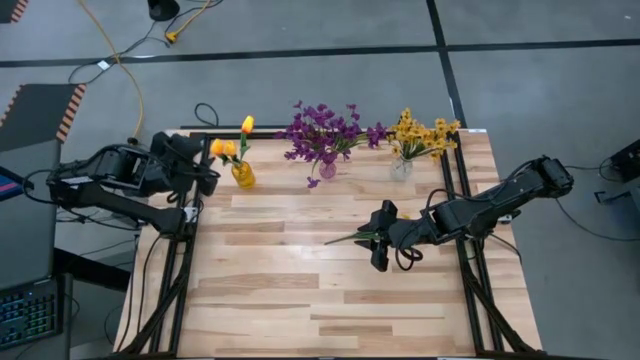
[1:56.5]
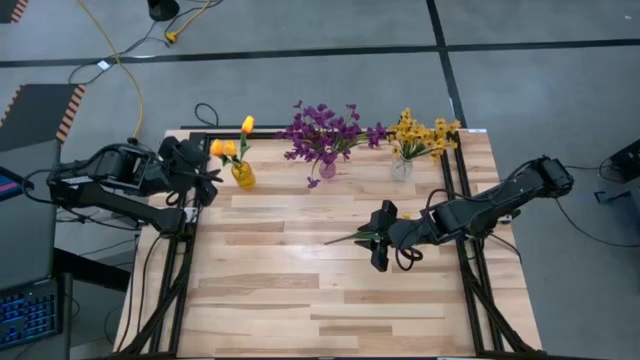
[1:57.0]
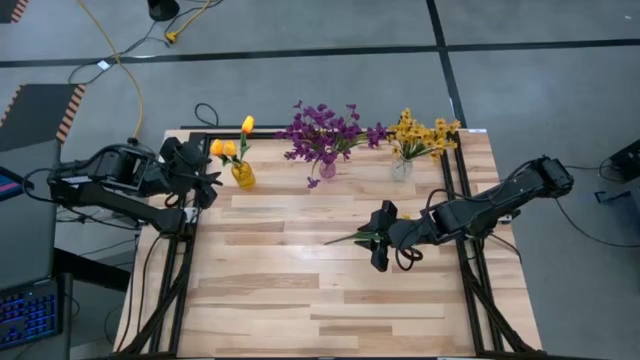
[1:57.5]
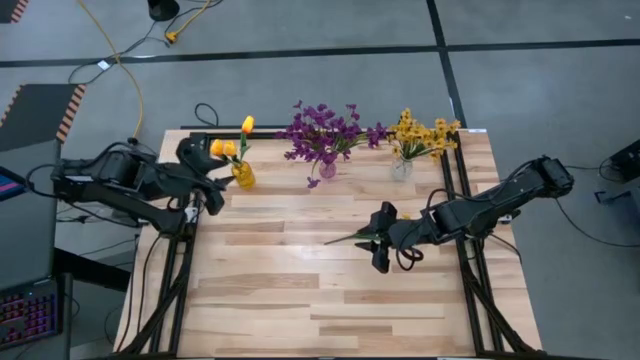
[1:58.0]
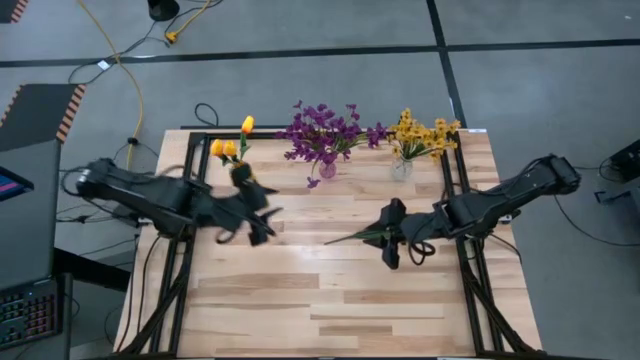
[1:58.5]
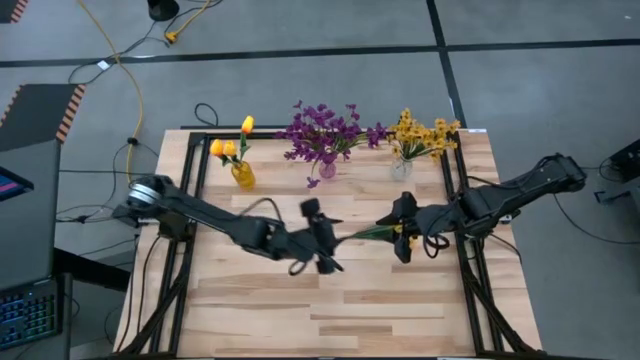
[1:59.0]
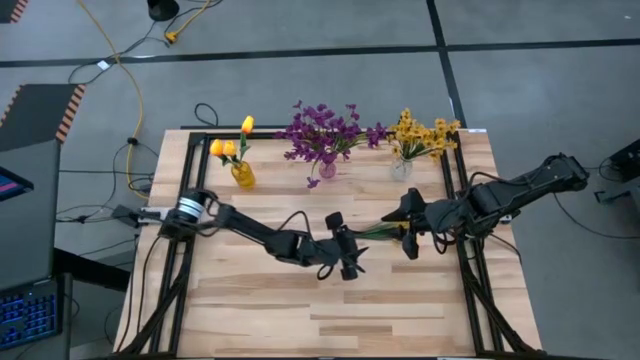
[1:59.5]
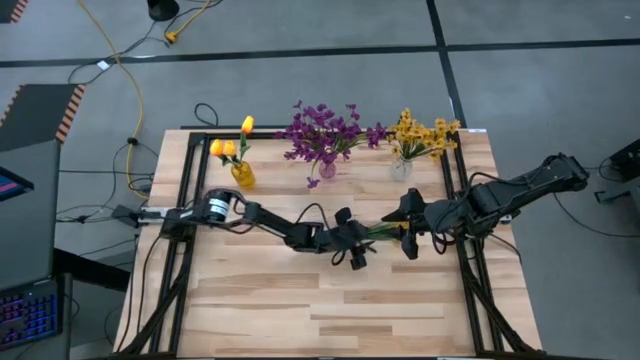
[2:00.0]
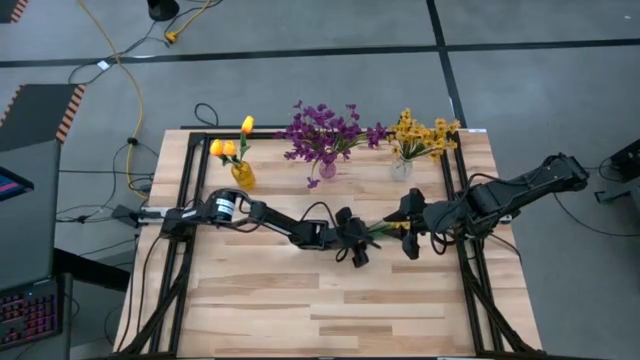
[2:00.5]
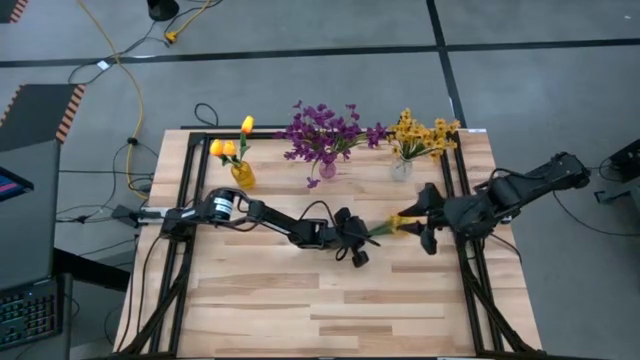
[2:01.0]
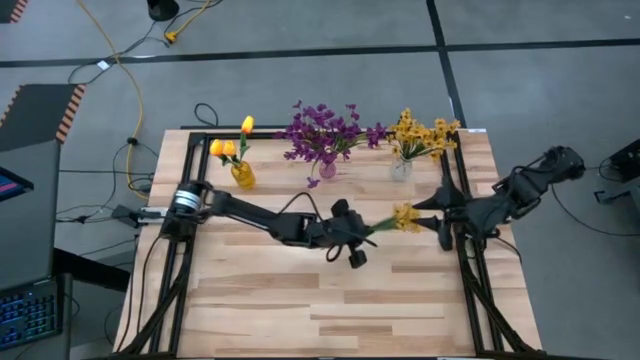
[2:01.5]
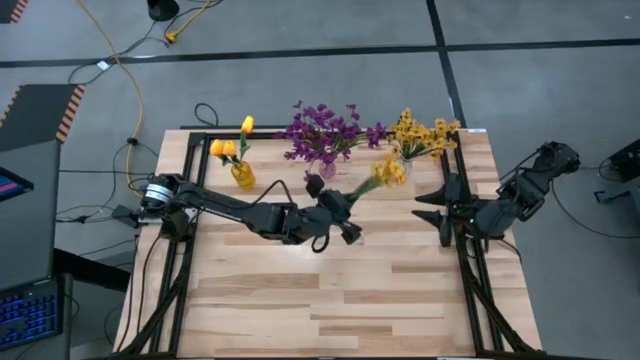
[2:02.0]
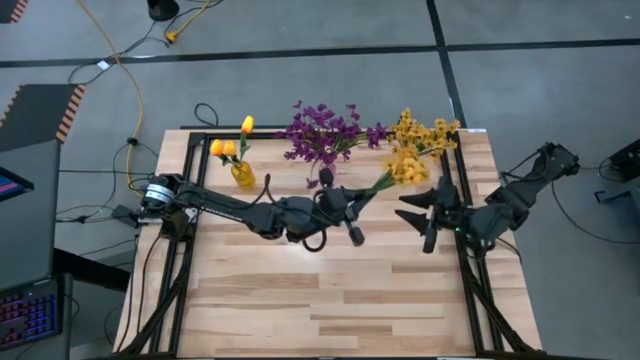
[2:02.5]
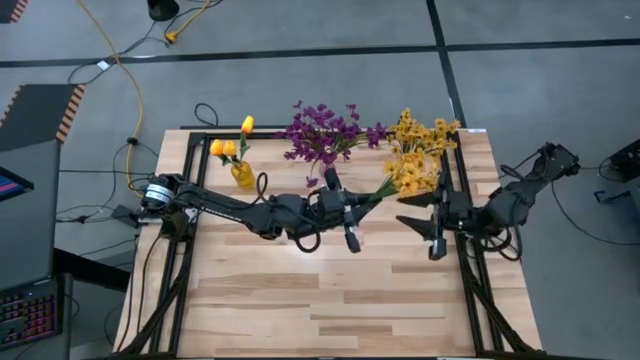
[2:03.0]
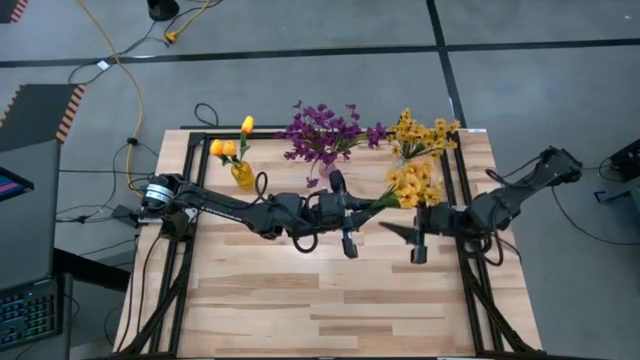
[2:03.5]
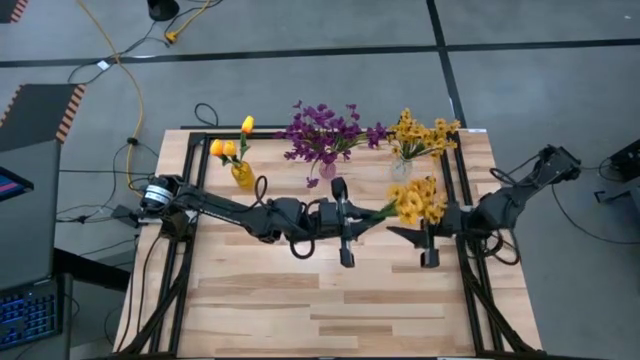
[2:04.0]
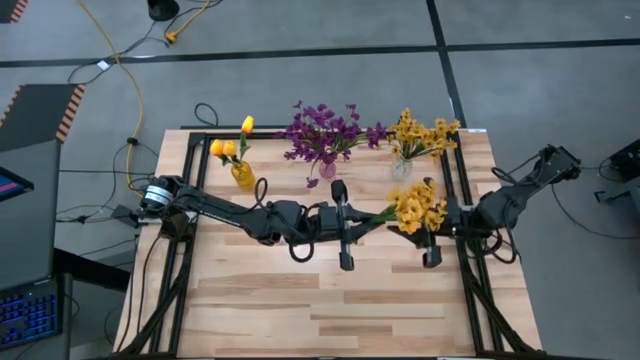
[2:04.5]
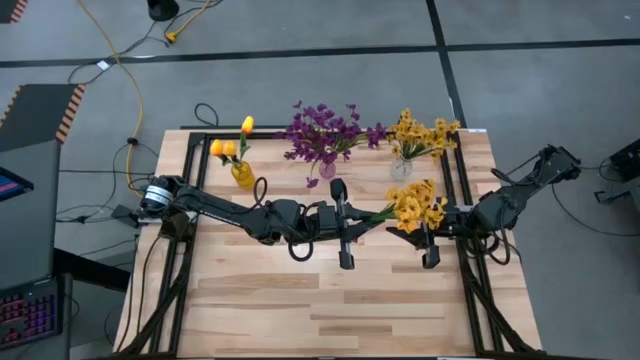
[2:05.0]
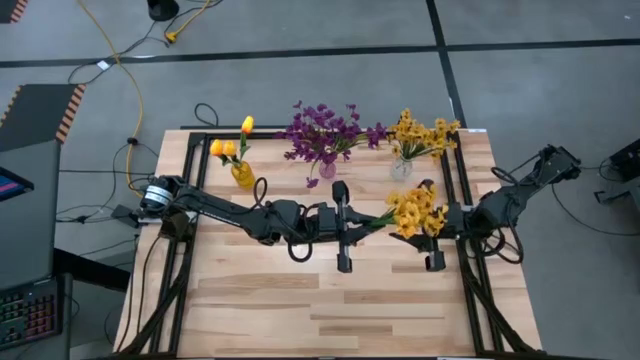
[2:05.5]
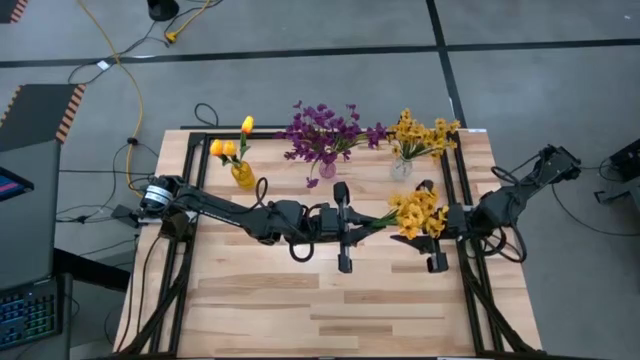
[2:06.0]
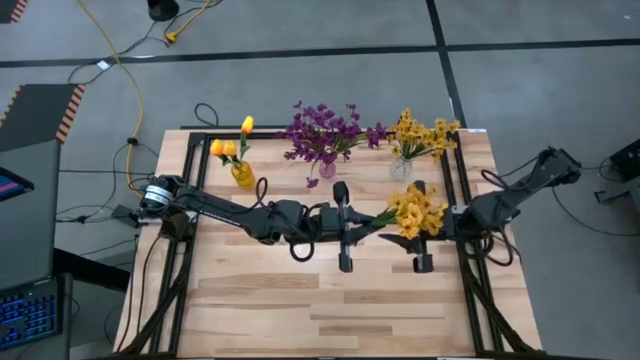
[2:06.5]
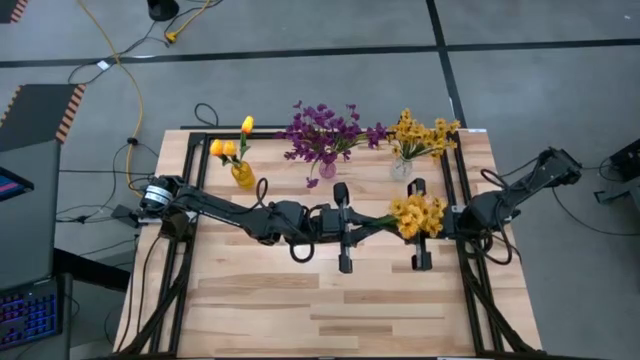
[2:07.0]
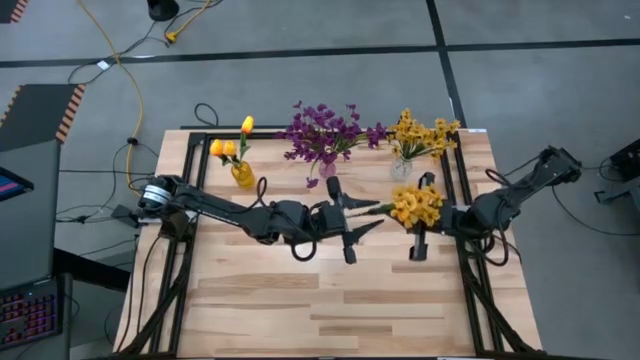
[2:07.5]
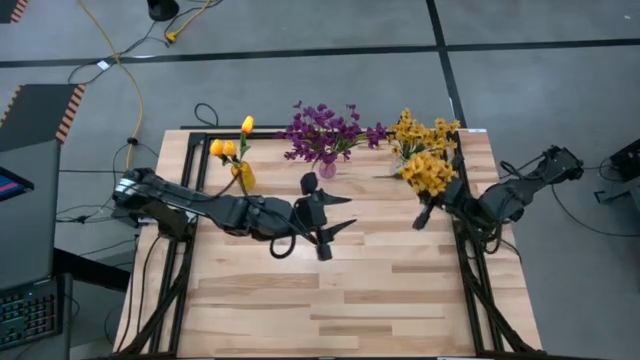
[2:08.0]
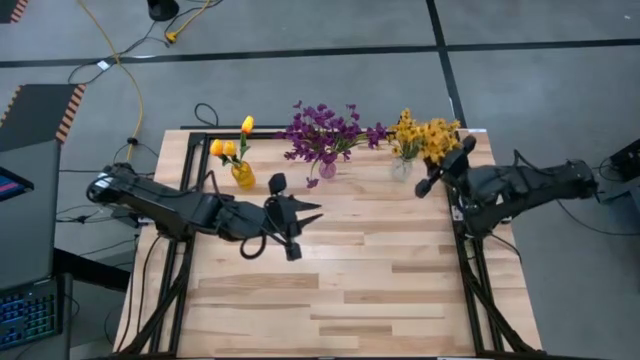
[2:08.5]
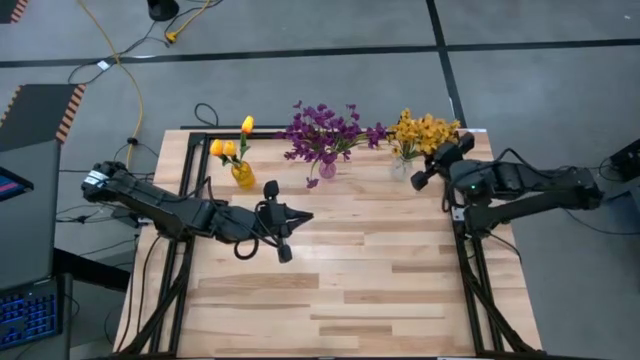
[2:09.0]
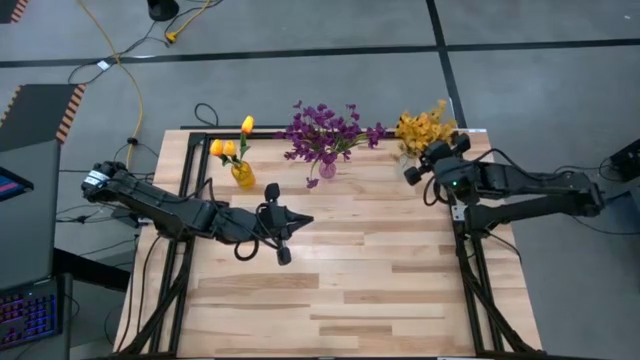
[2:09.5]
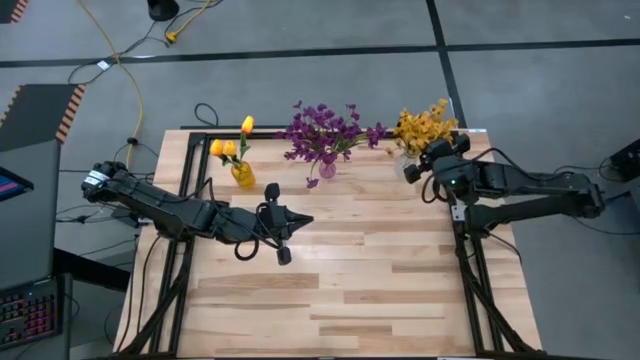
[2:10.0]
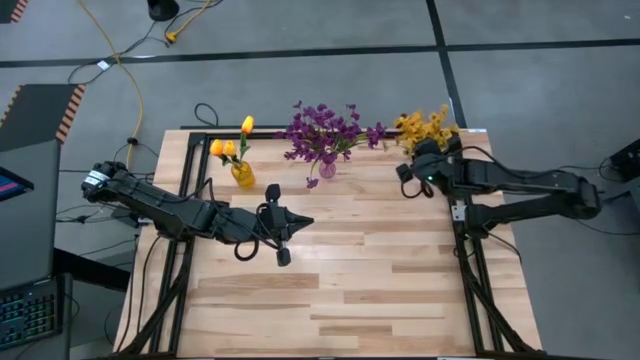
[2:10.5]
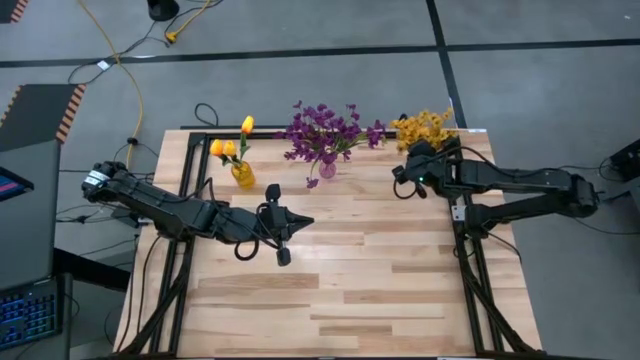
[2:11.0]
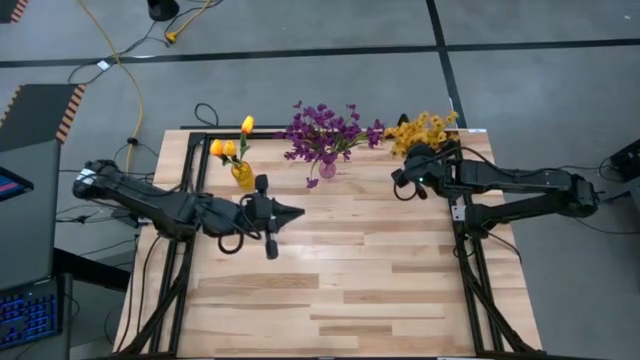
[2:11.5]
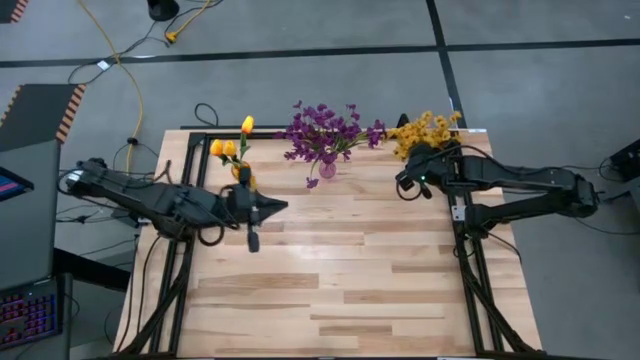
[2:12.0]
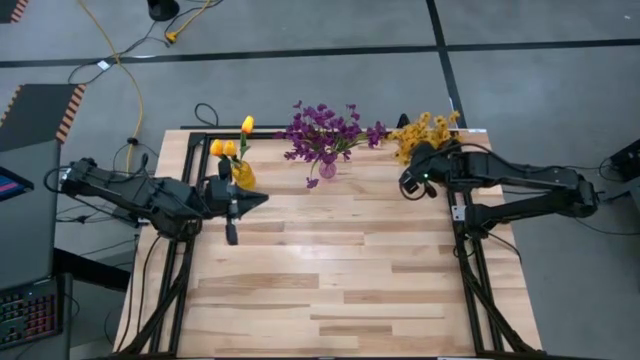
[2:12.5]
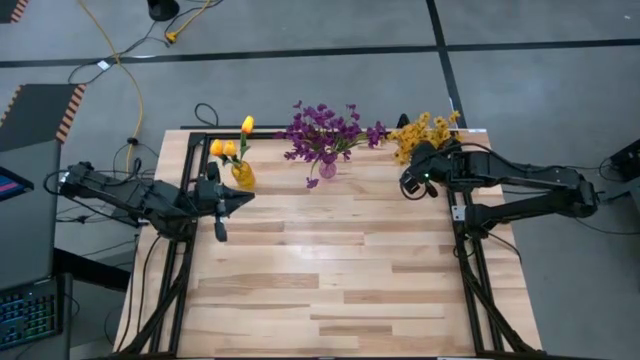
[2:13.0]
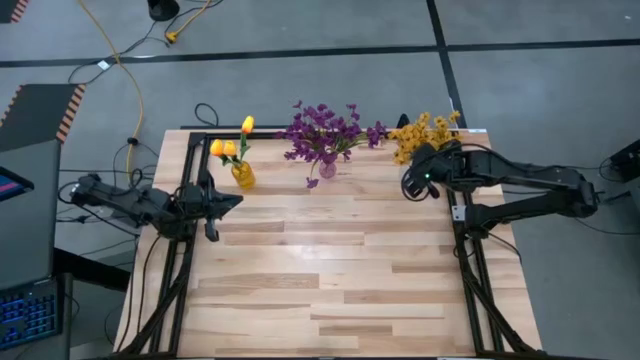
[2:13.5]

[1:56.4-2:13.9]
Task: Sort flowers into vase by color
Put the yellow flowers into the transparent vase

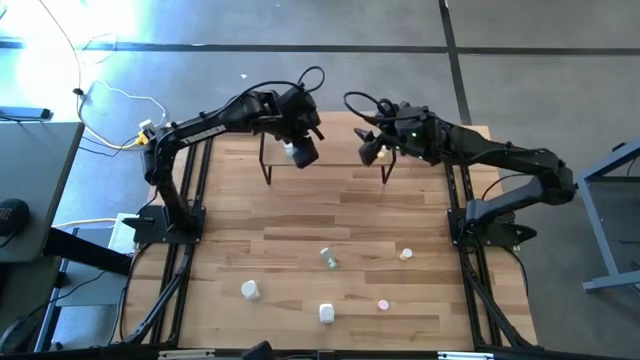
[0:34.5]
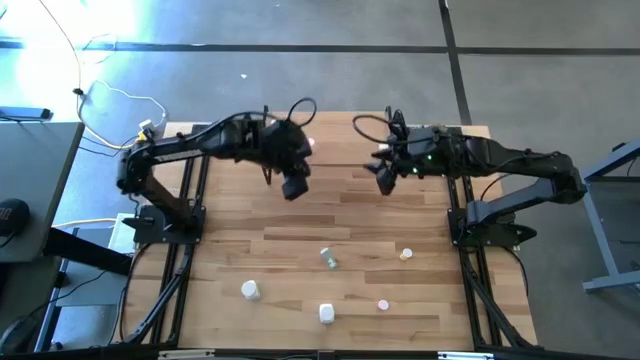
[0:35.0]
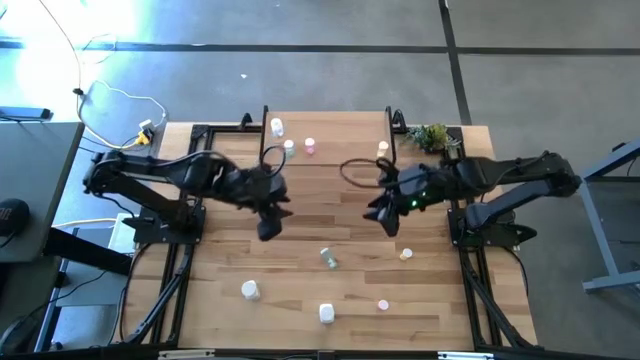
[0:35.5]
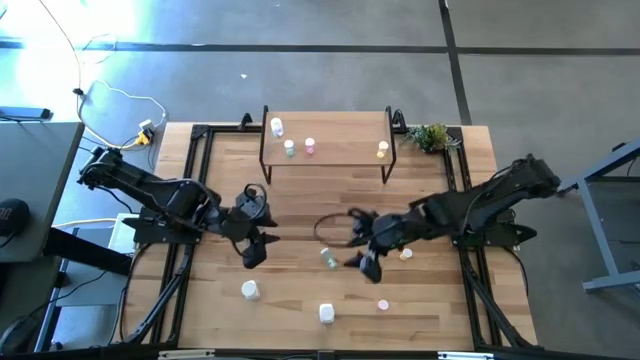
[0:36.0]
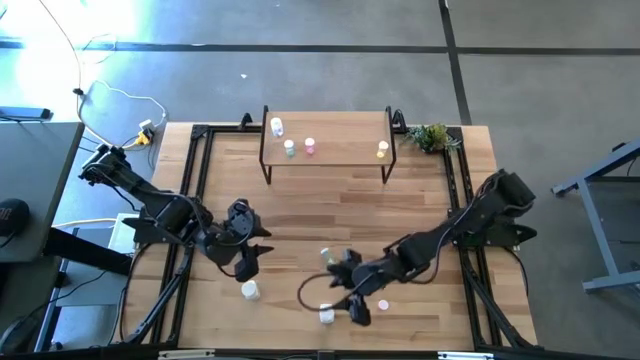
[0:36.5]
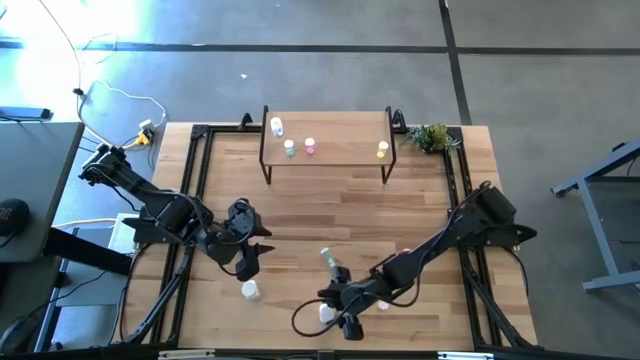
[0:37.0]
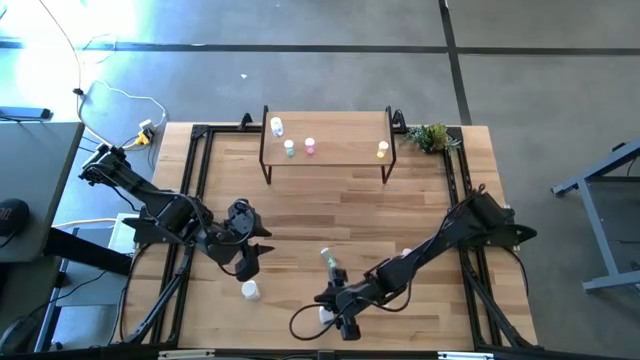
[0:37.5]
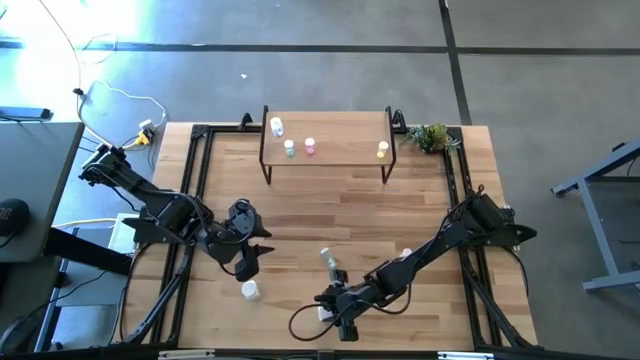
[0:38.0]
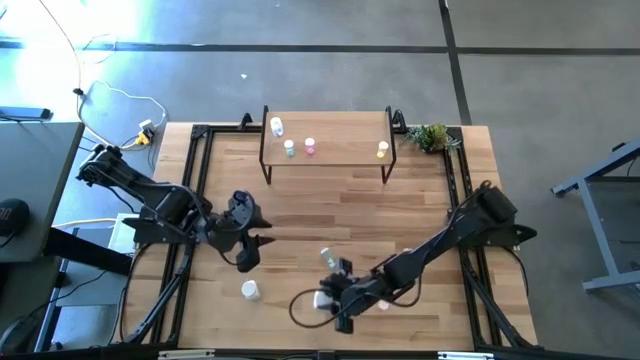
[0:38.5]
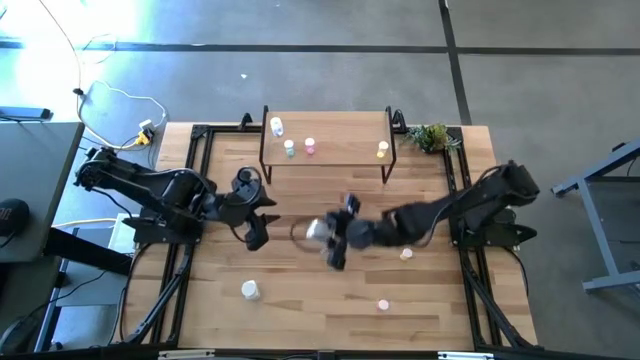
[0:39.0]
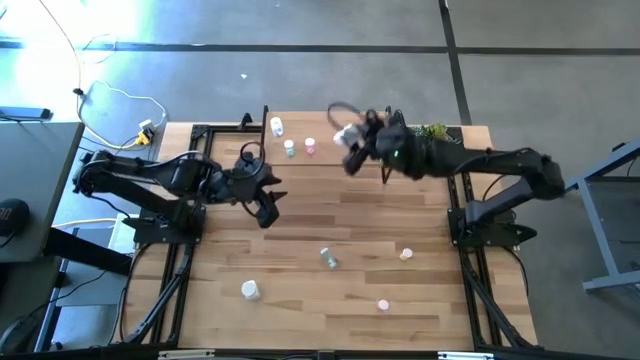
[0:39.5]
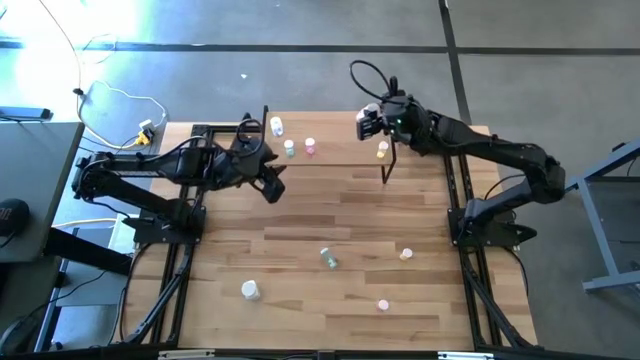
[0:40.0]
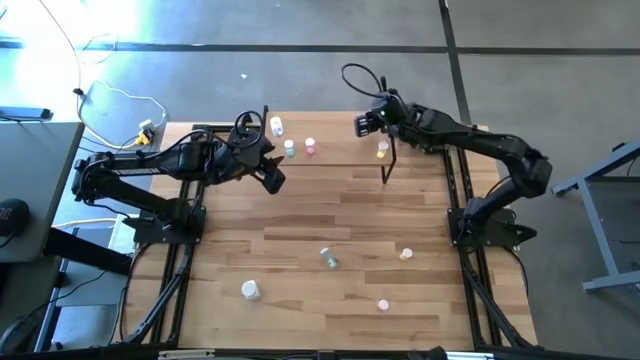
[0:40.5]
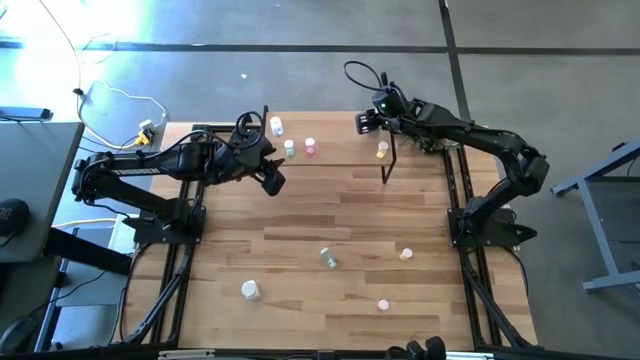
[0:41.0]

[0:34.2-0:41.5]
Task: Pick and place medicine bottles onto shelf by color
Put the right white medicine bottle on the shelf
